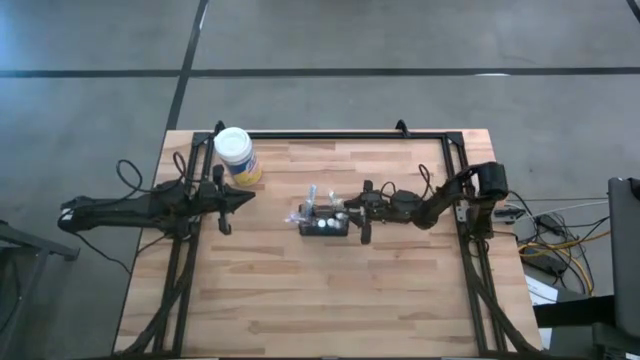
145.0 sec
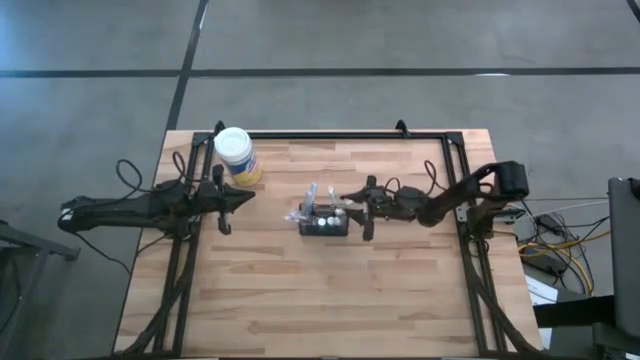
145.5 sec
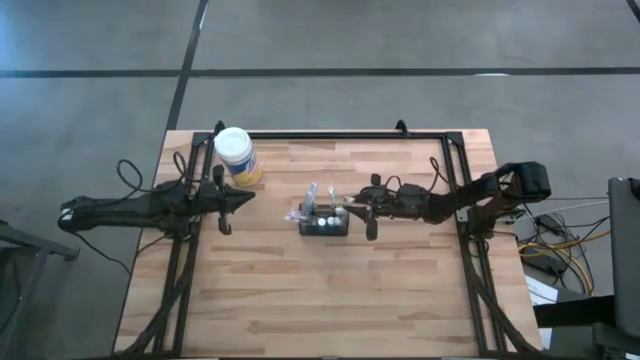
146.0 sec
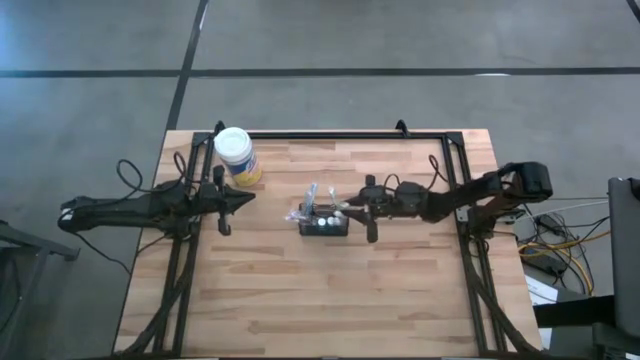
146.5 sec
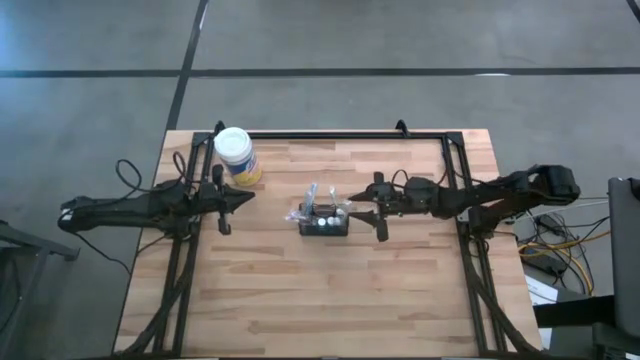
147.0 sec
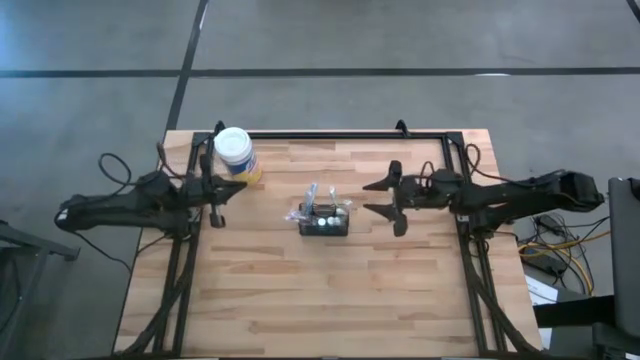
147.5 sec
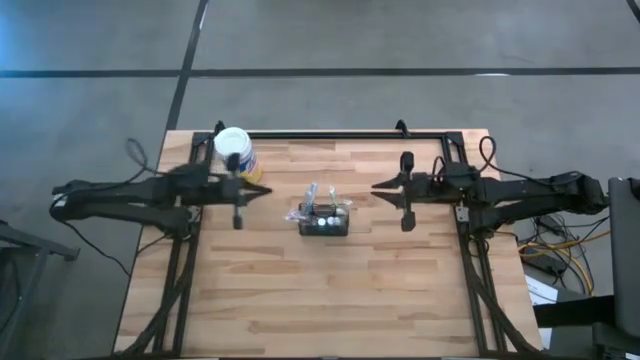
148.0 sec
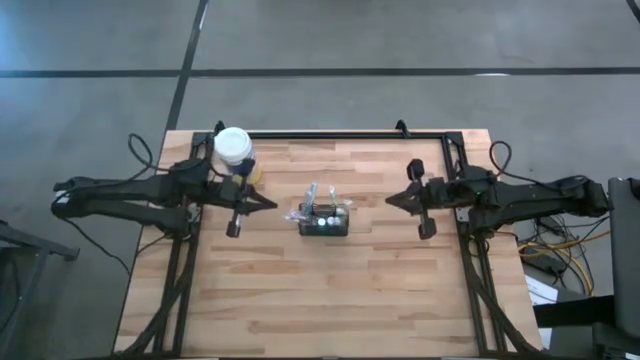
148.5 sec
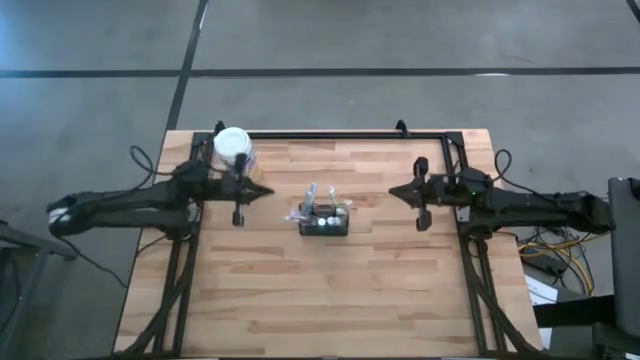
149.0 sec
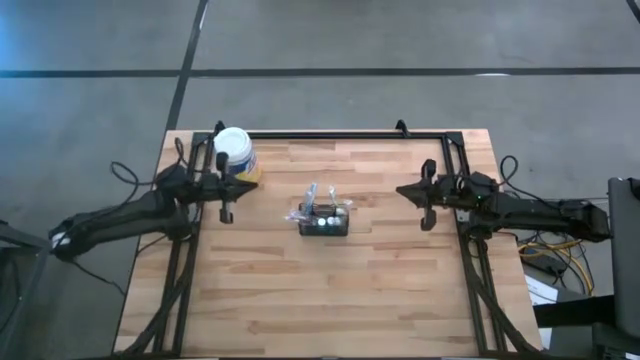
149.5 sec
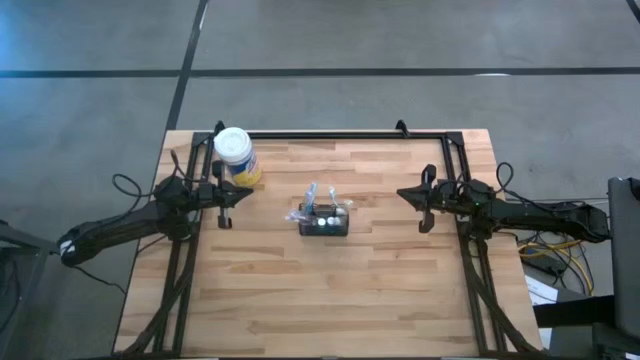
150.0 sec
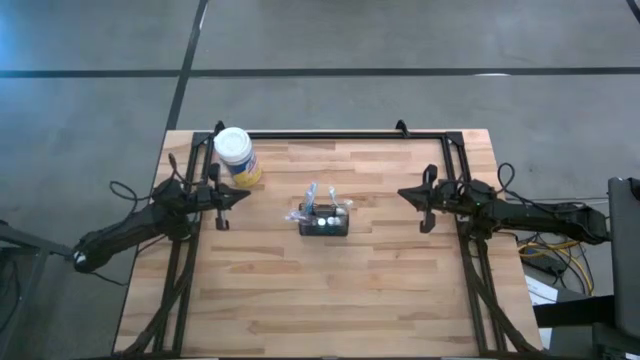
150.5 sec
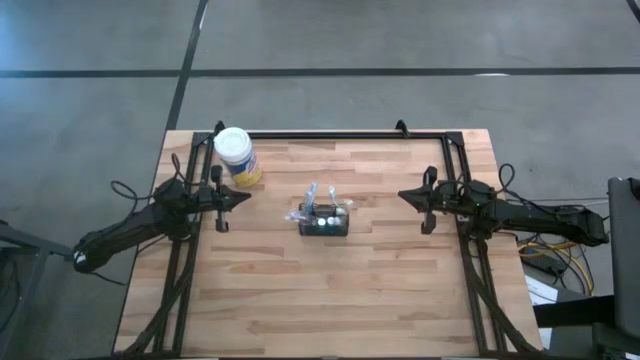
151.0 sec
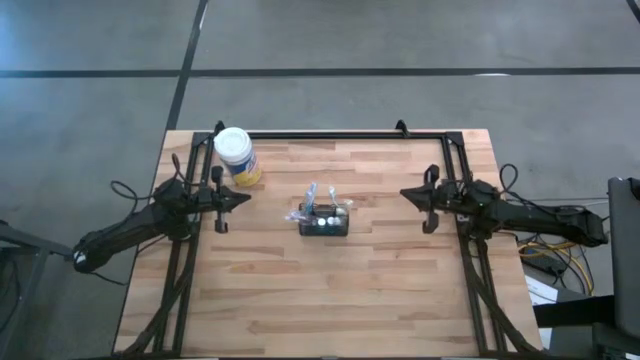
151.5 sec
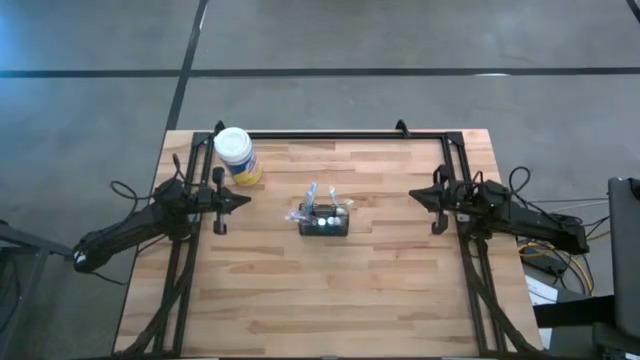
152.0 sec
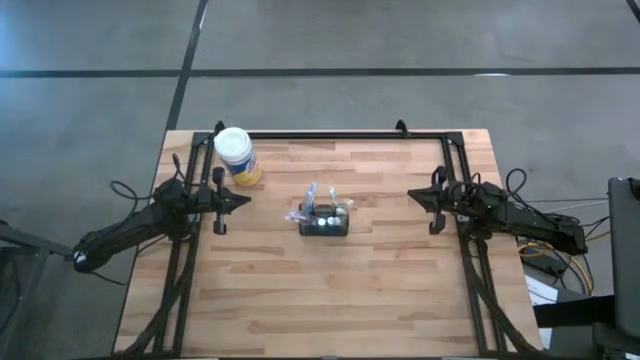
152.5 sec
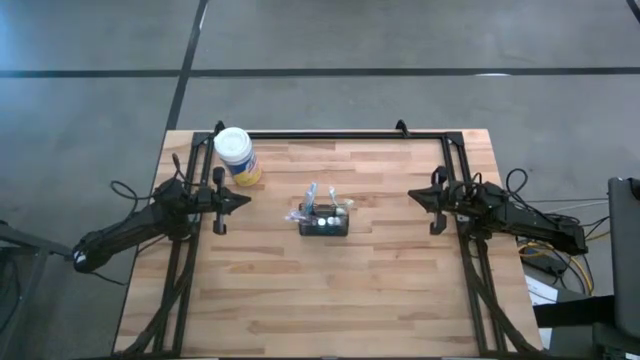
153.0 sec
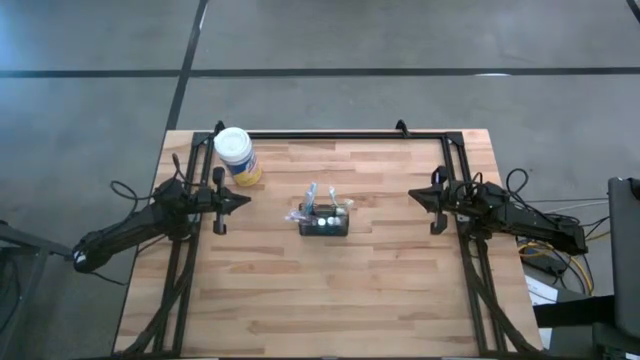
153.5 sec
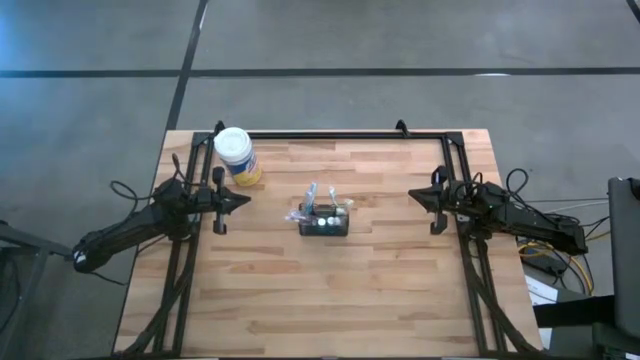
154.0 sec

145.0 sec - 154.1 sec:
Task: Pick & Place toothbrushing station
Return to Home Position

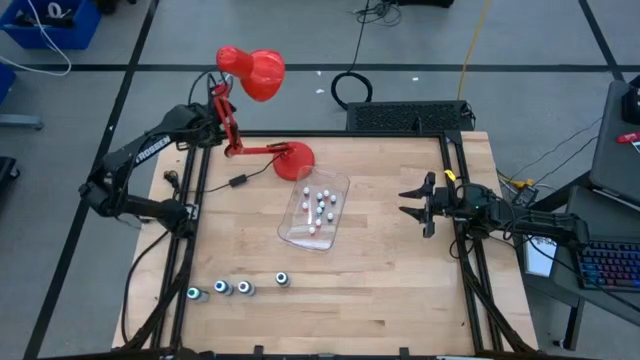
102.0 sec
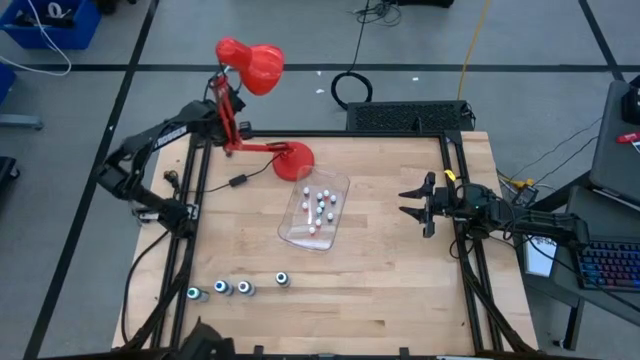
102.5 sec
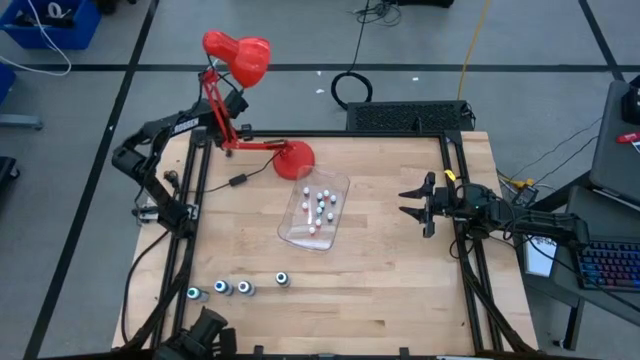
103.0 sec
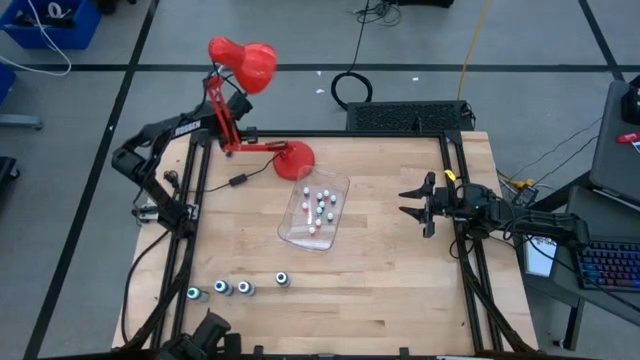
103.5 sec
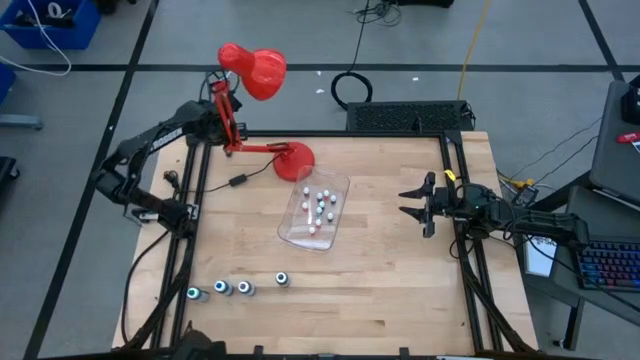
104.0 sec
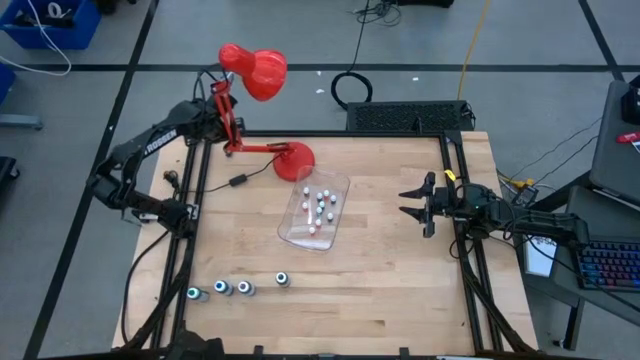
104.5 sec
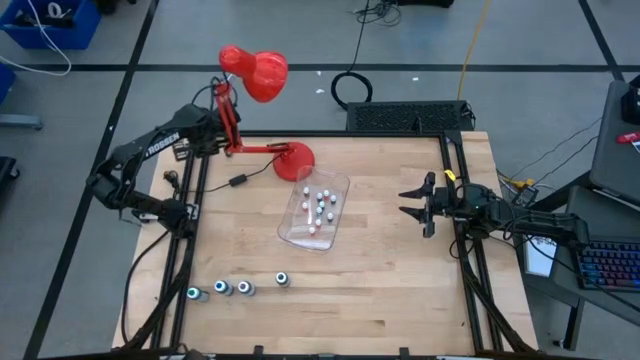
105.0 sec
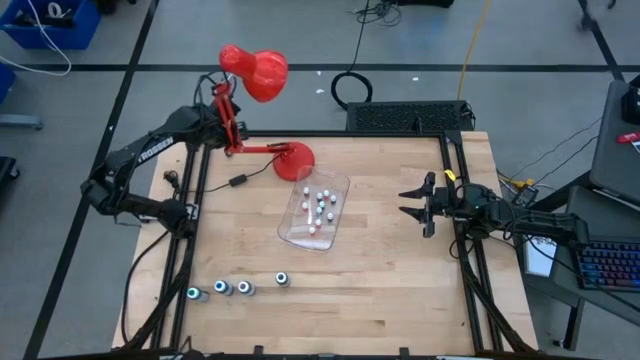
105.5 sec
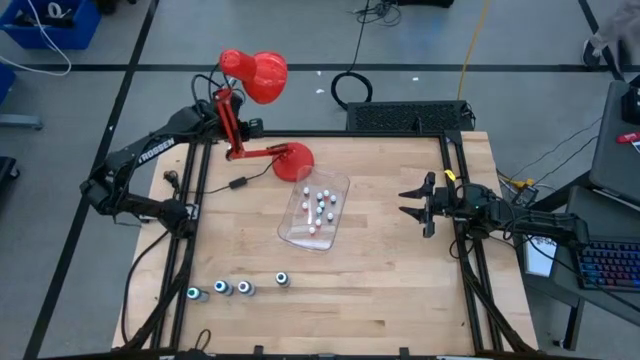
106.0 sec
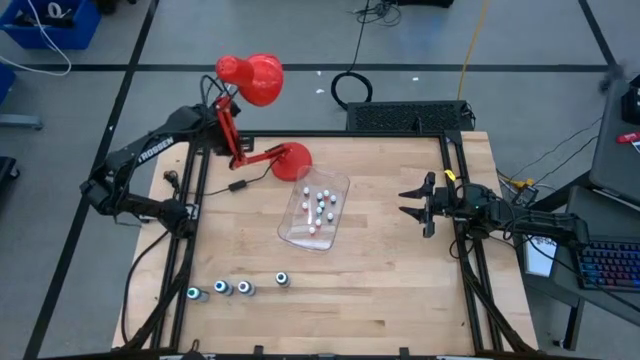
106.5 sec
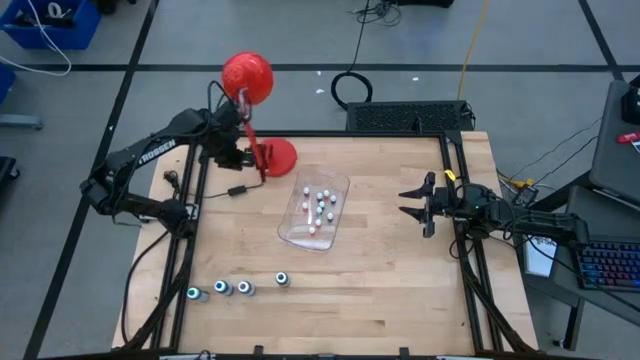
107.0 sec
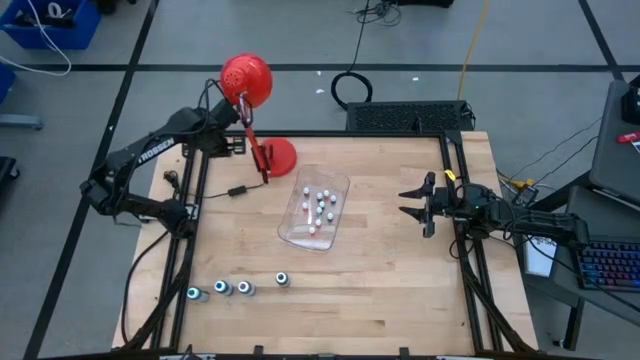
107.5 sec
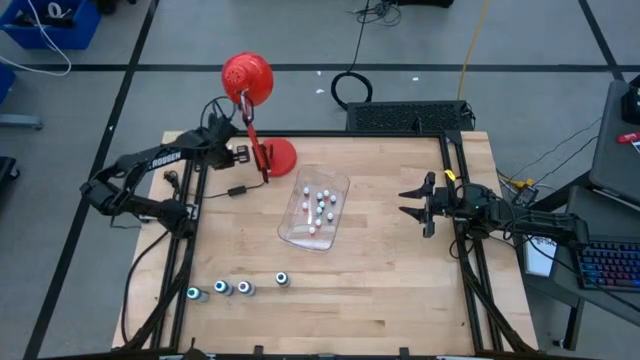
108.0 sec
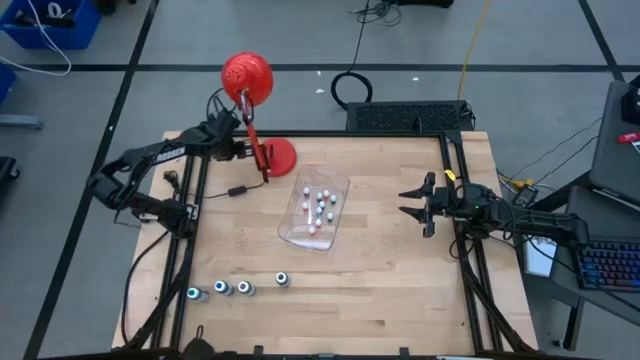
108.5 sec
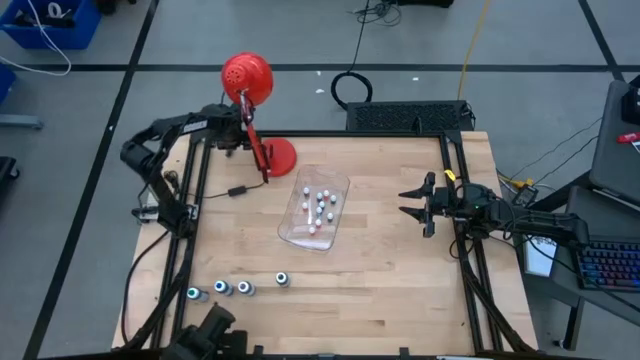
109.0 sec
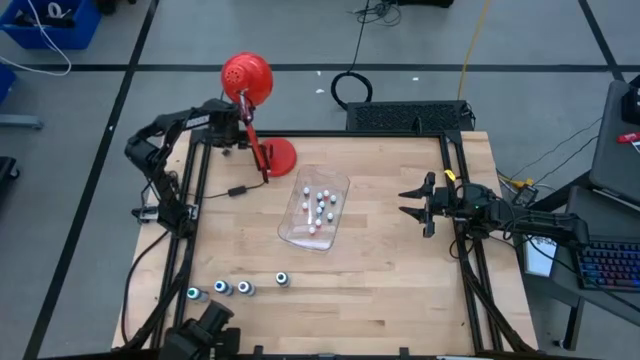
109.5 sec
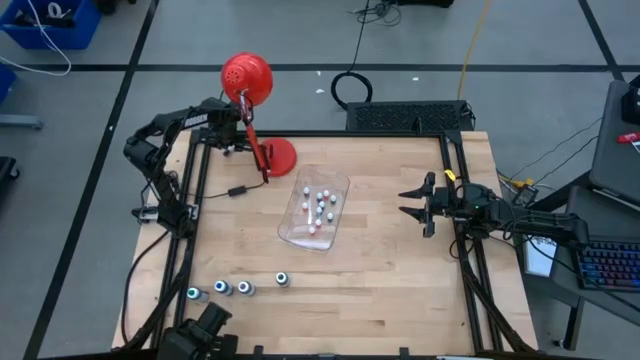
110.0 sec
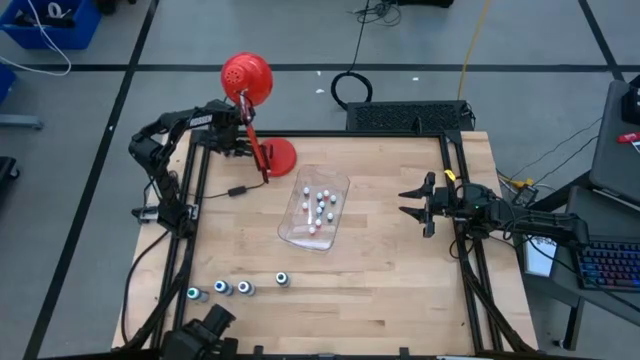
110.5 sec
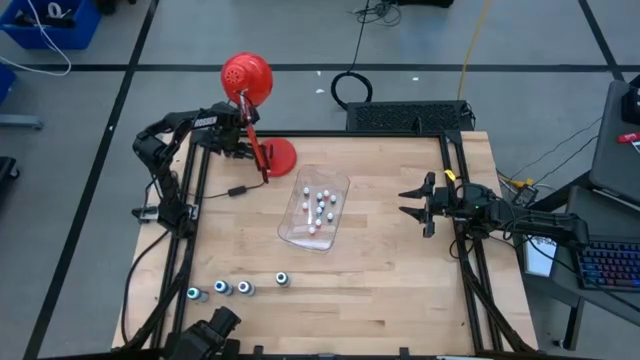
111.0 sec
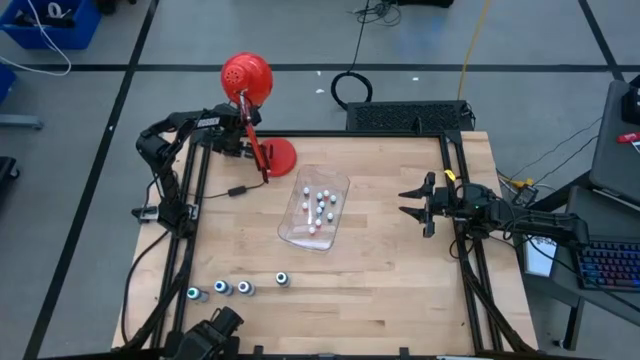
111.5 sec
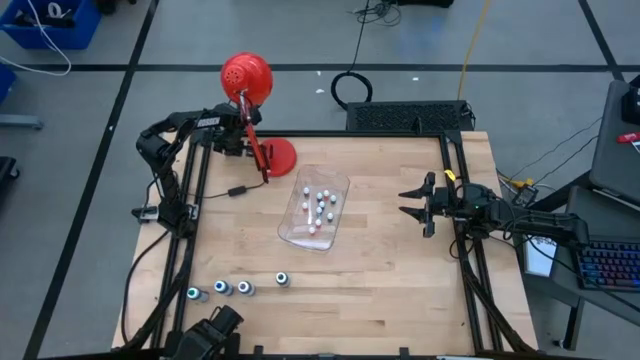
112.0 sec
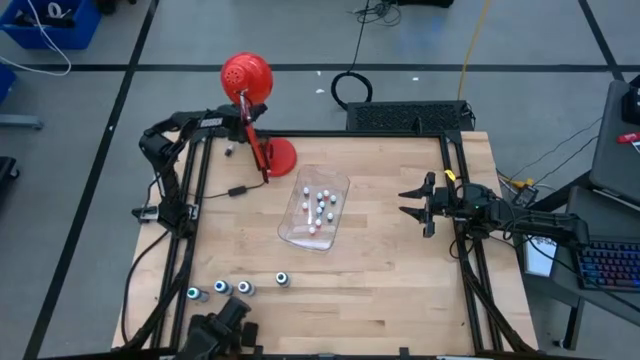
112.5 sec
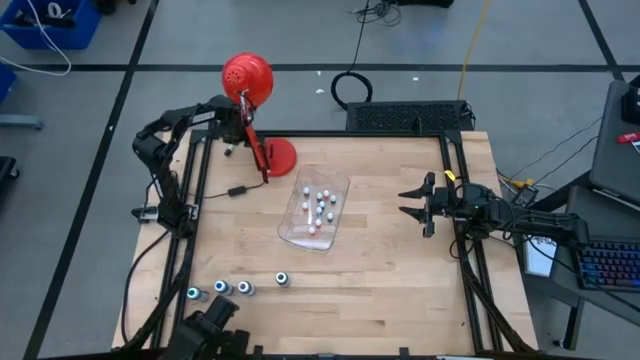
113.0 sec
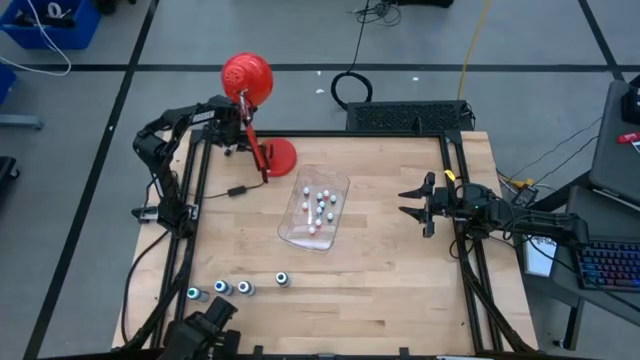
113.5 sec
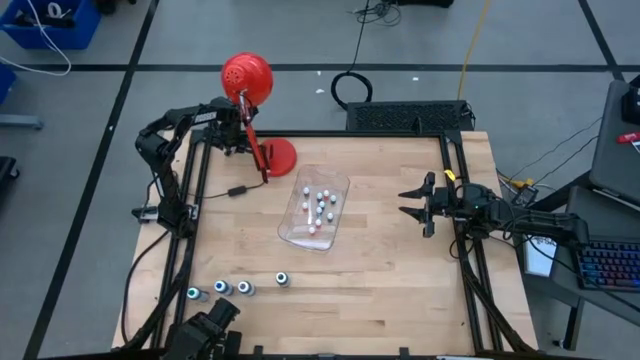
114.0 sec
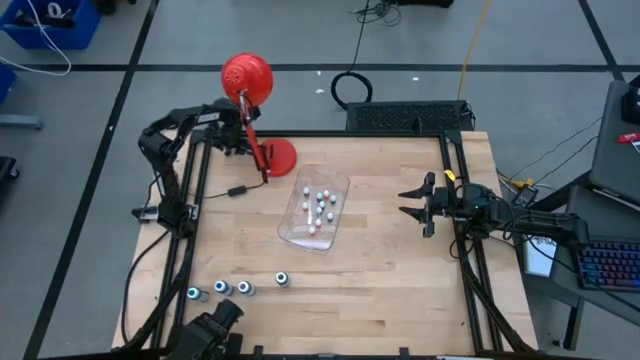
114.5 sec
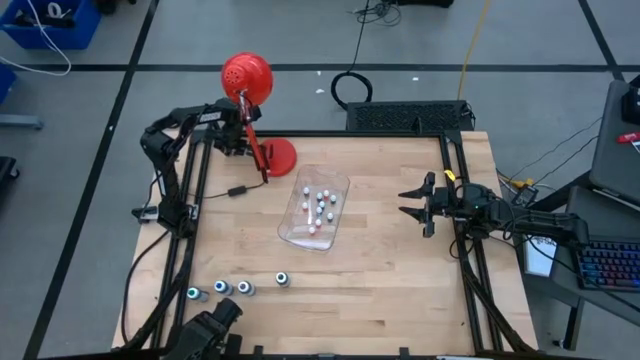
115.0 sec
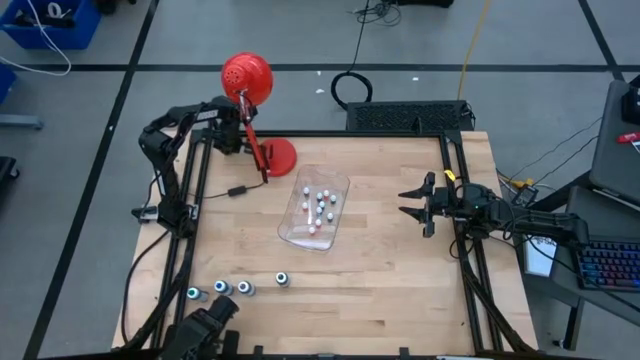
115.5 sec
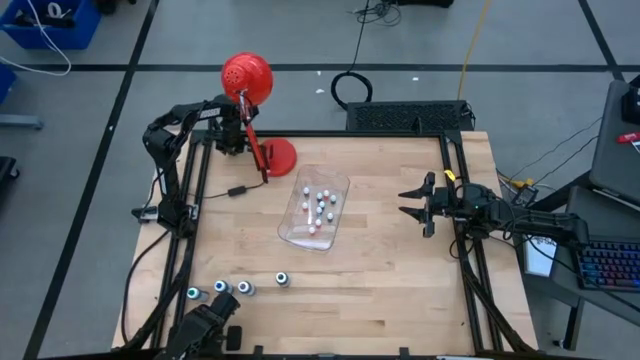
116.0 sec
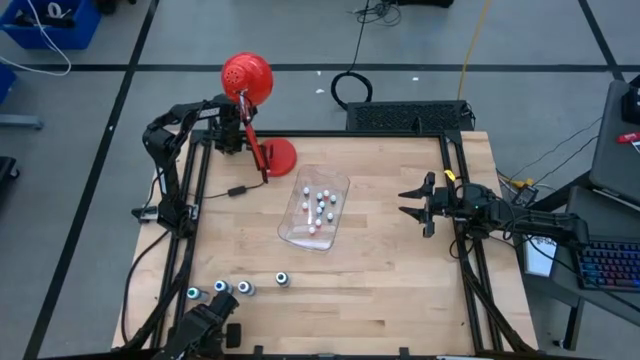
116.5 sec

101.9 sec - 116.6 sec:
Task: Pick & Place food coloring
Put the small purple food coloring bottle into the transparent bin
